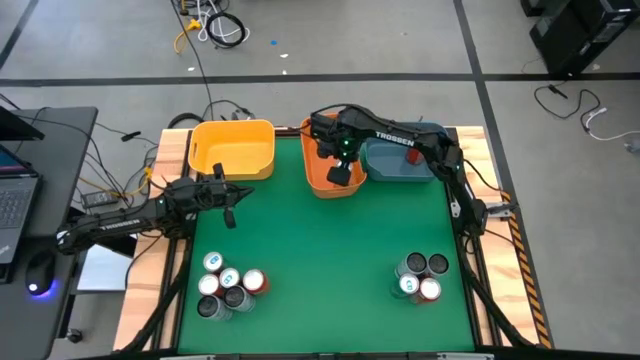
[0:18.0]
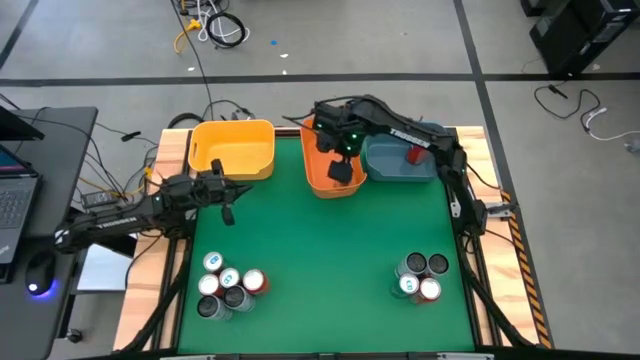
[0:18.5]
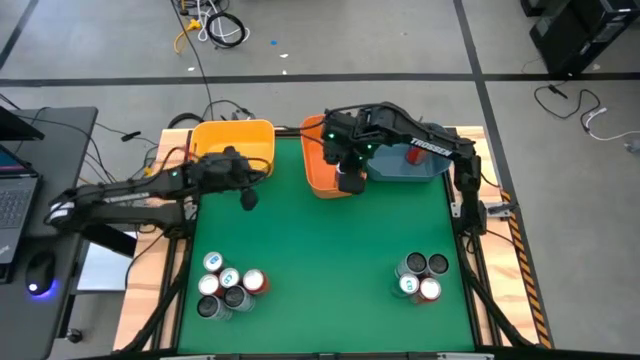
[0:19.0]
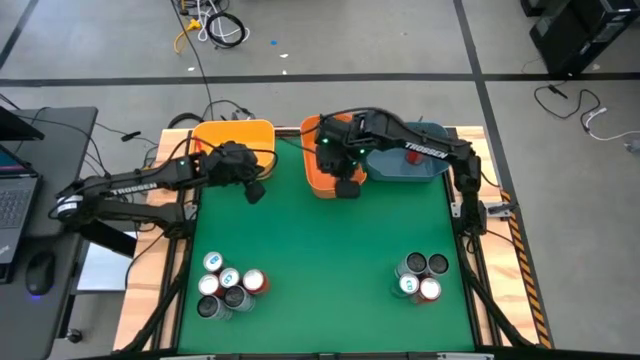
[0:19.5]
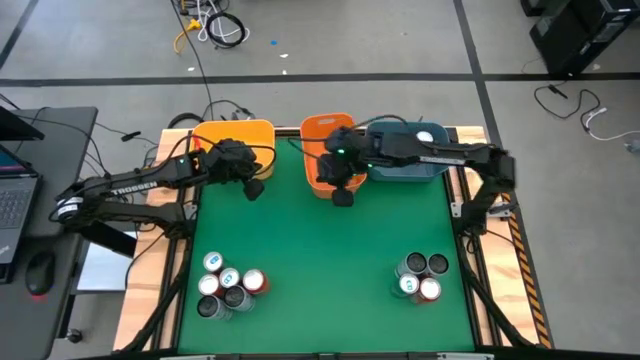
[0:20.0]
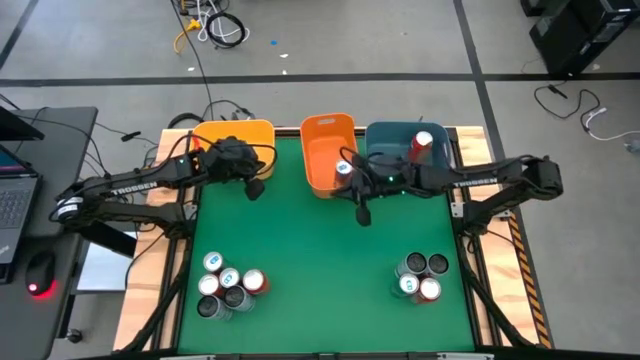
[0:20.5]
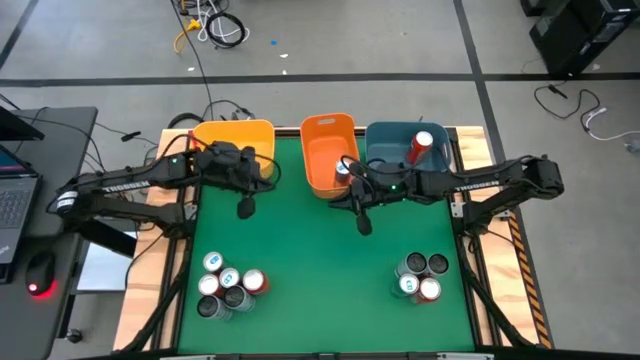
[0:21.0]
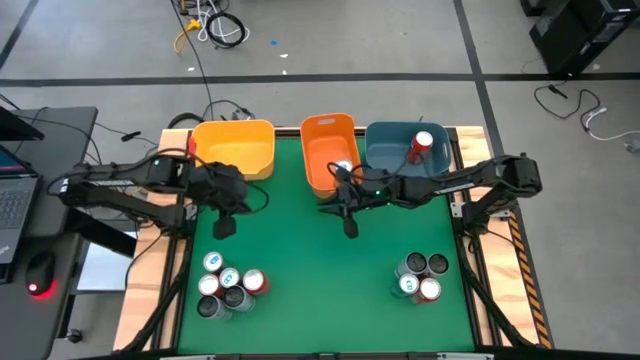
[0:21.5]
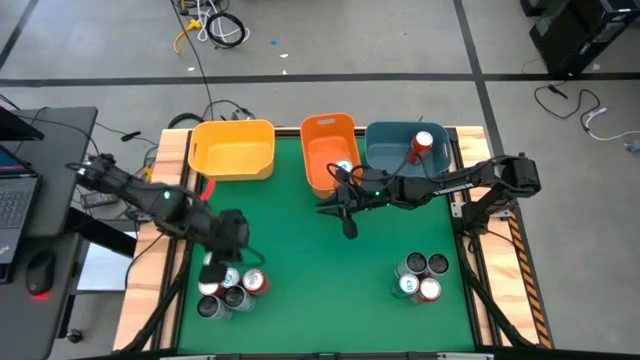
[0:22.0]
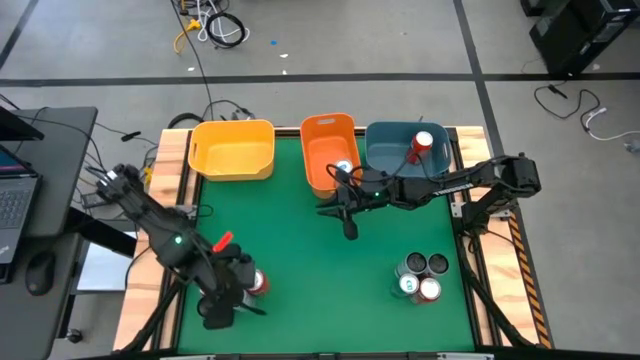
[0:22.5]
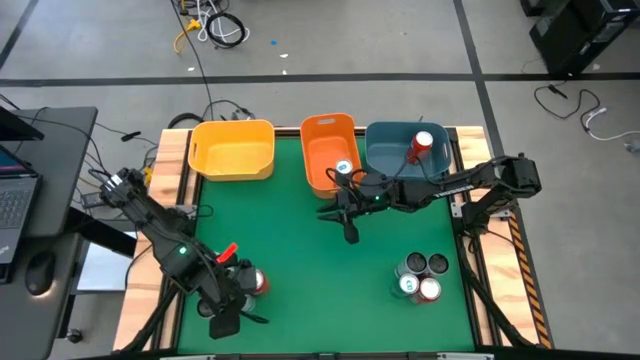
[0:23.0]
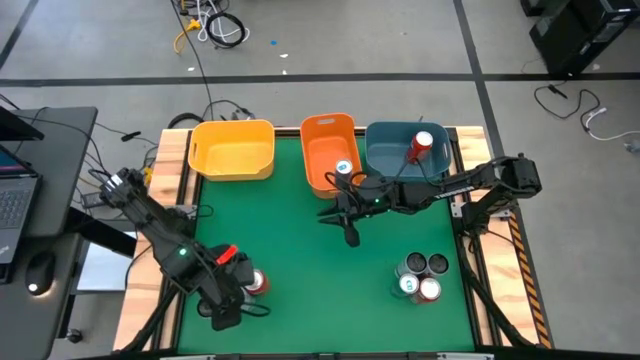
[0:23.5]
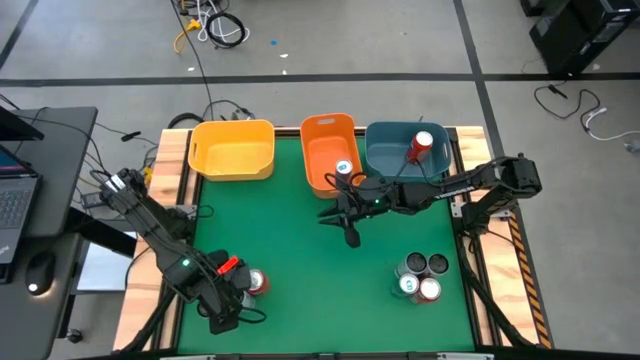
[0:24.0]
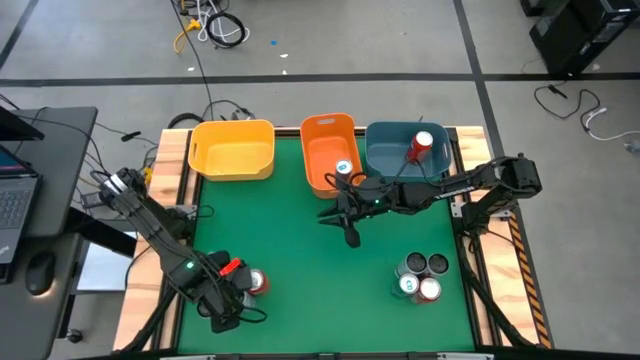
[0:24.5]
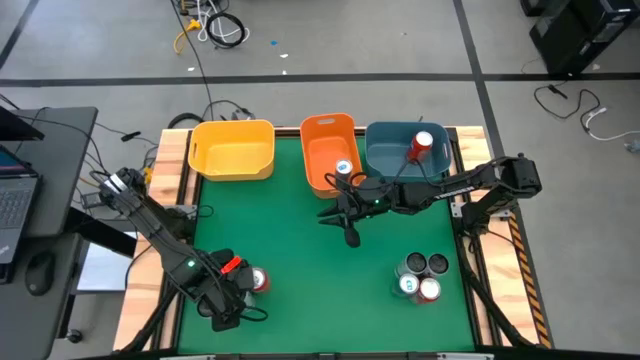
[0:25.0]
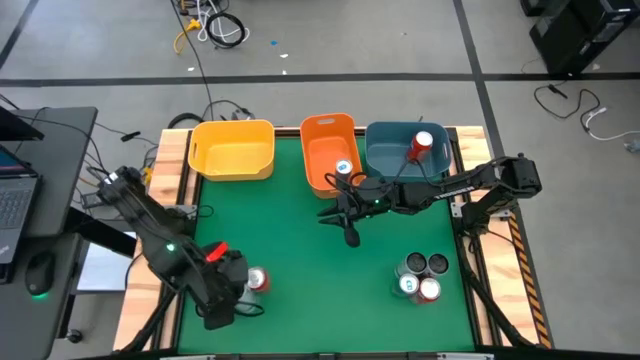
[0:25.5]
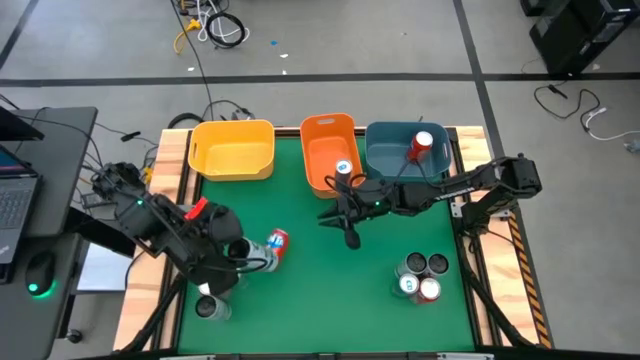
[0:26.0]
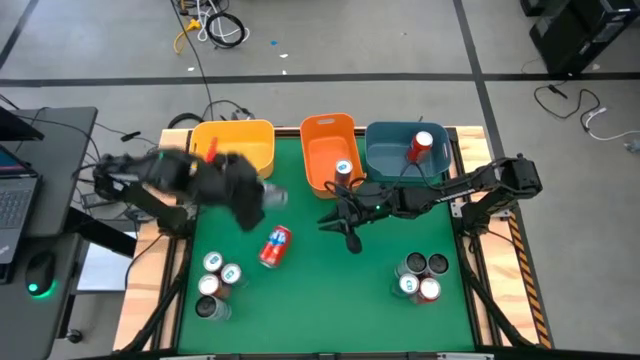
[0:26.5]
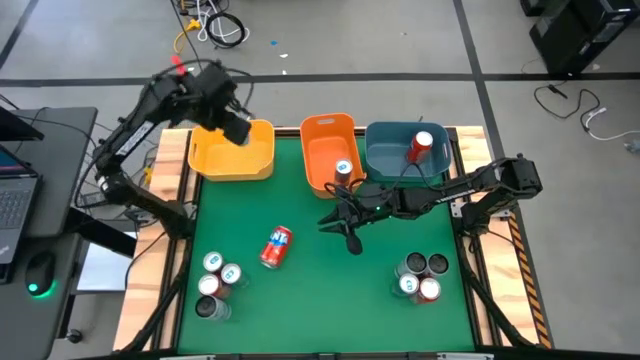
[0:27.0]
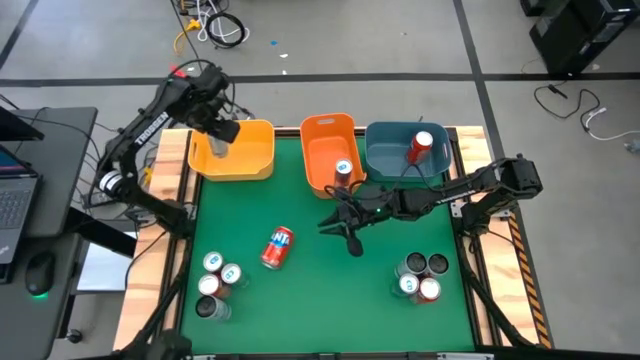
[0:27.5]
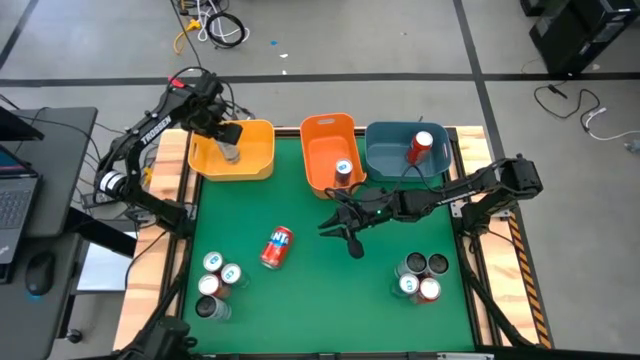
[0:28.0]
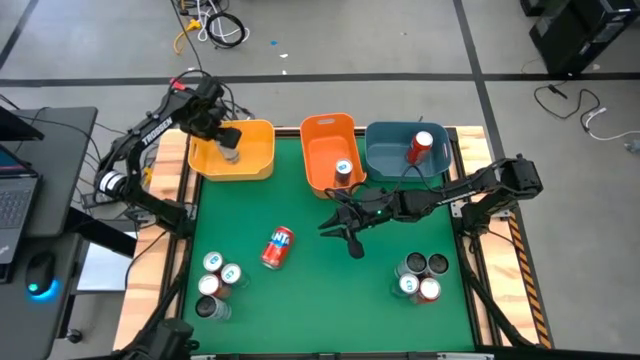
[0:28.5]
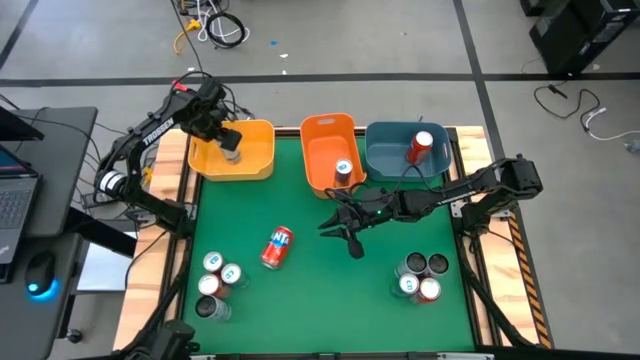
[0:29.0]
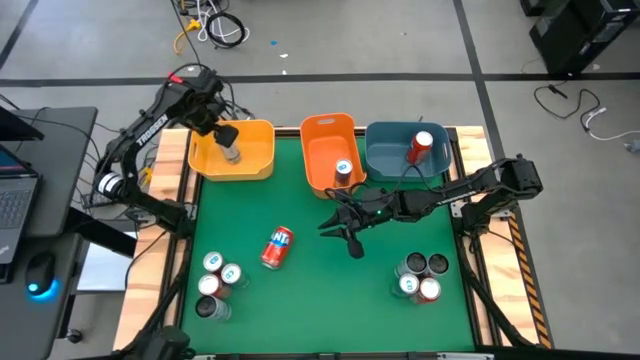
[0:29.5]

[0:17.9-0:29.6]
Task: Sort soda cans
Put the white blue soda can into the yellow bin

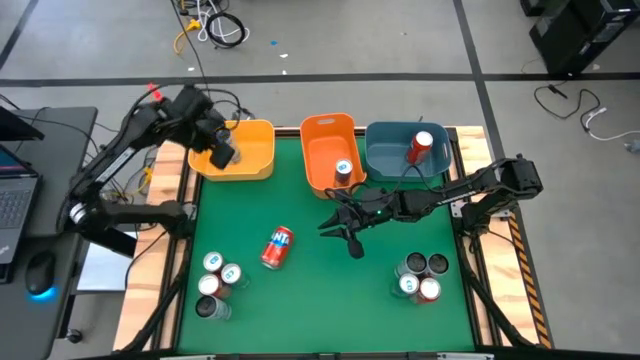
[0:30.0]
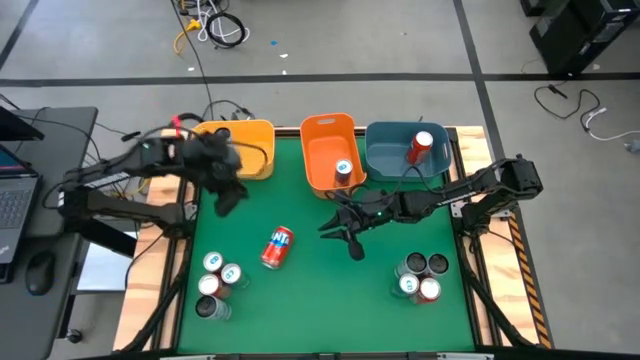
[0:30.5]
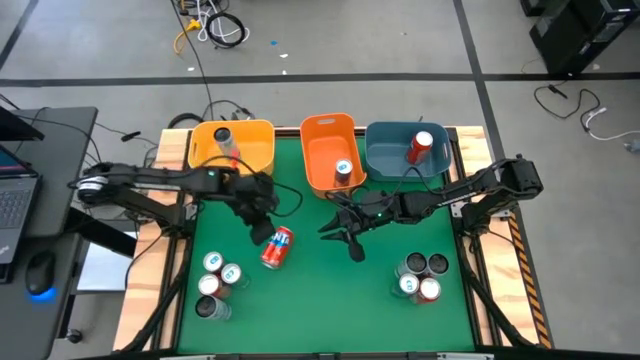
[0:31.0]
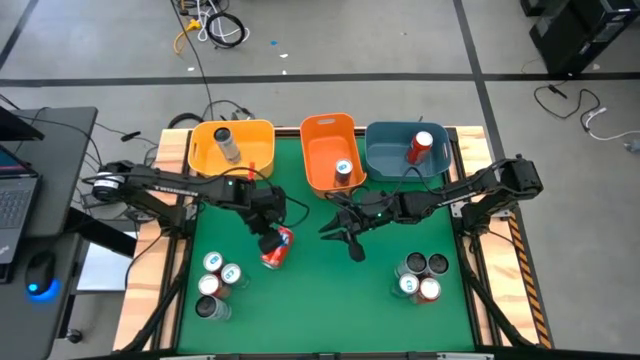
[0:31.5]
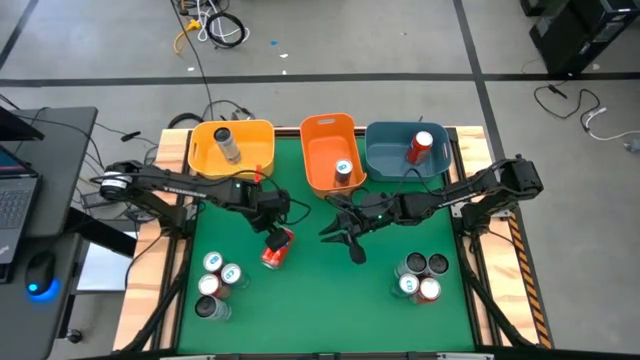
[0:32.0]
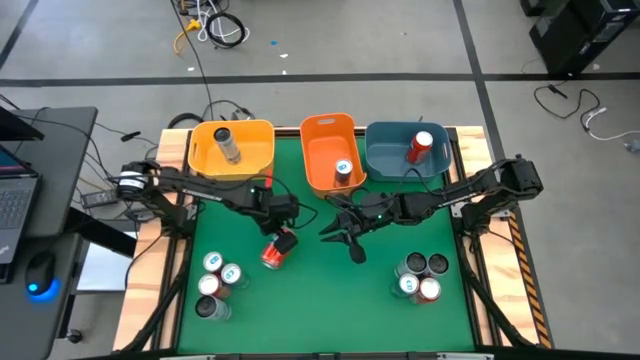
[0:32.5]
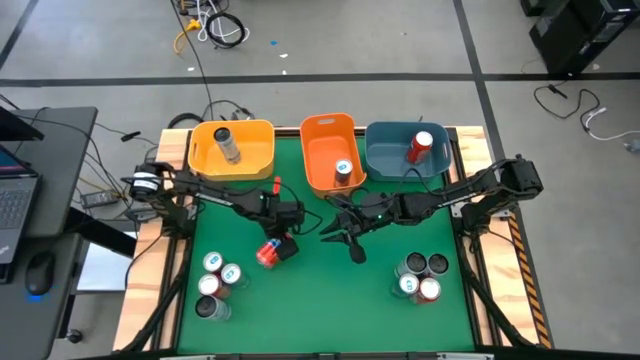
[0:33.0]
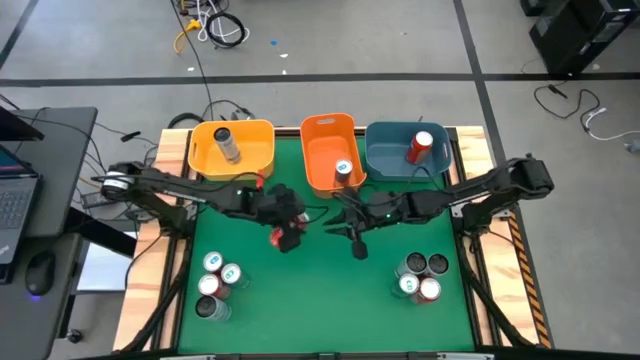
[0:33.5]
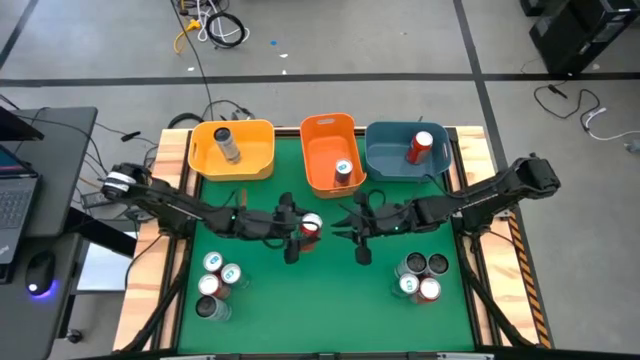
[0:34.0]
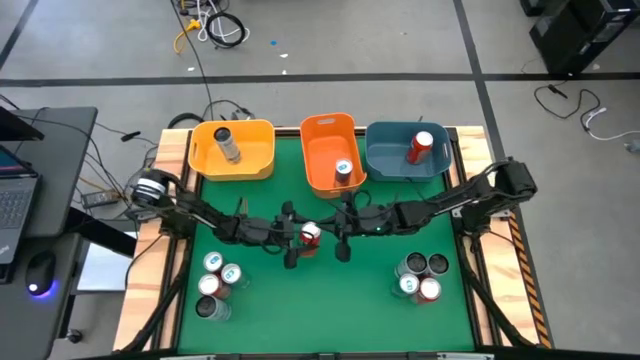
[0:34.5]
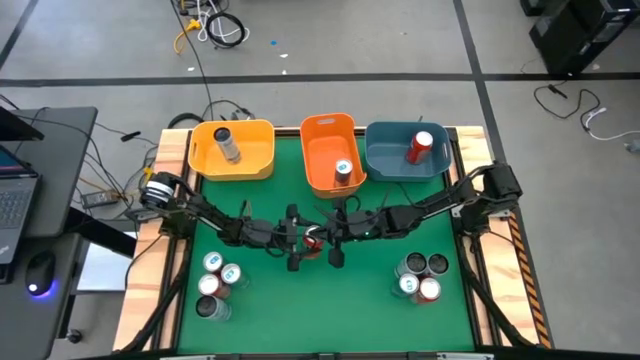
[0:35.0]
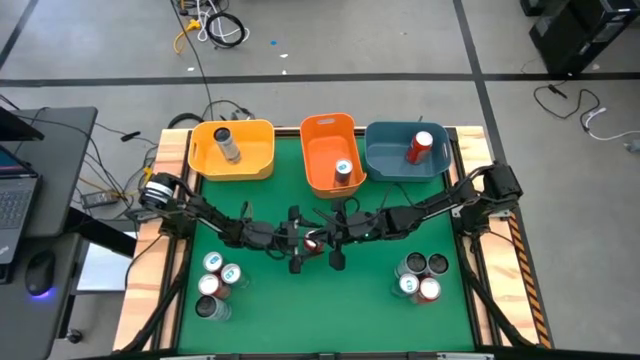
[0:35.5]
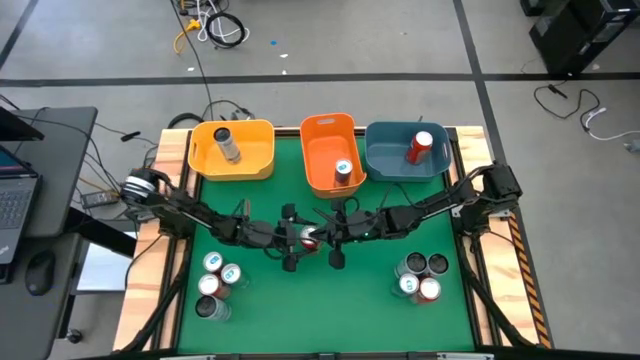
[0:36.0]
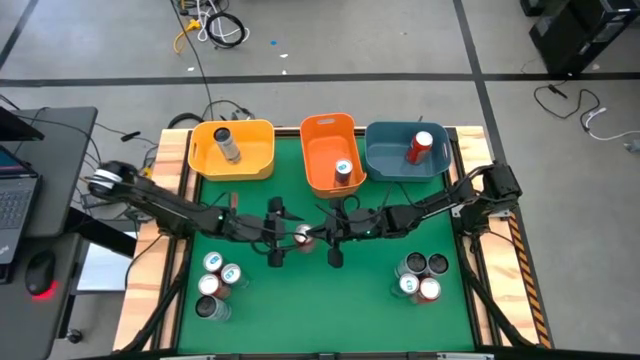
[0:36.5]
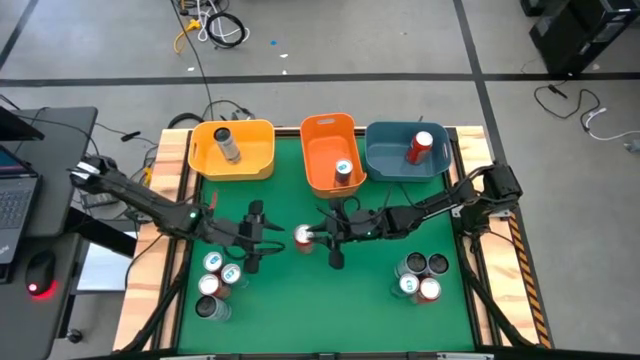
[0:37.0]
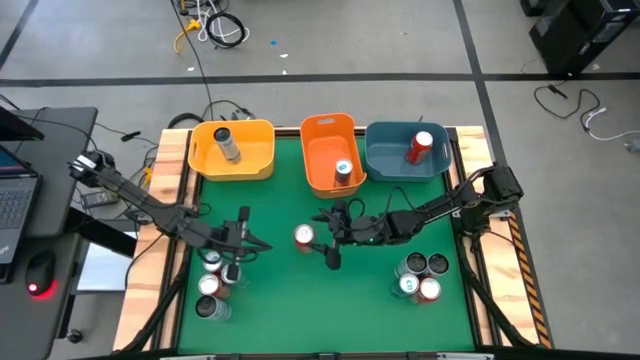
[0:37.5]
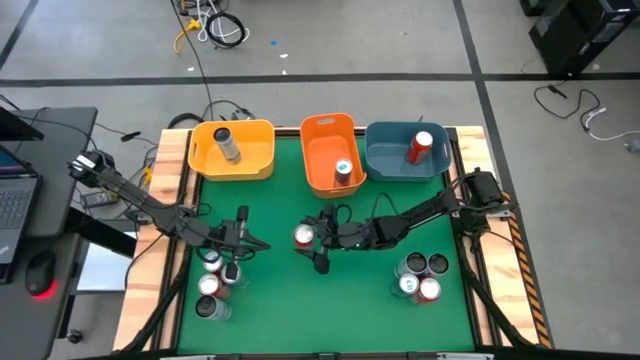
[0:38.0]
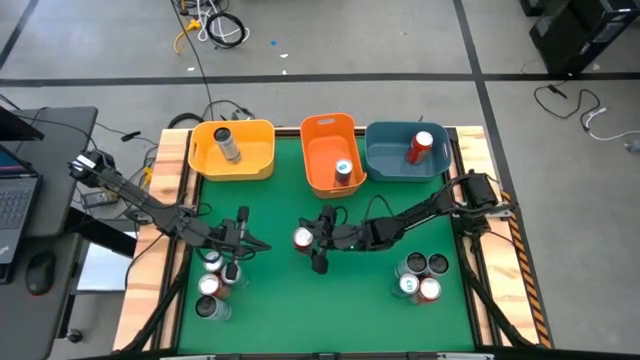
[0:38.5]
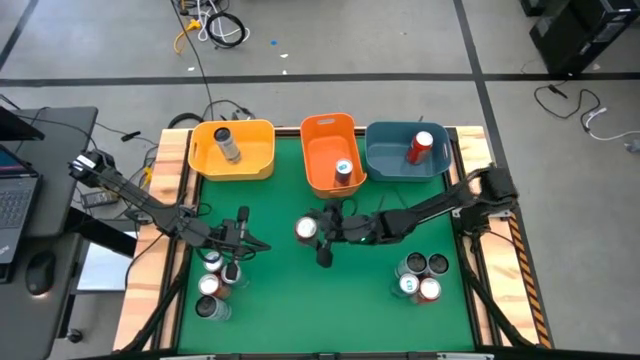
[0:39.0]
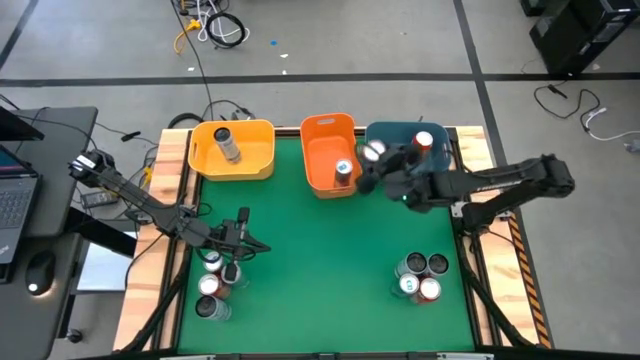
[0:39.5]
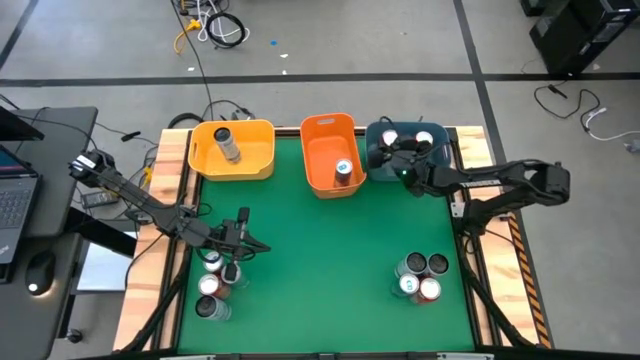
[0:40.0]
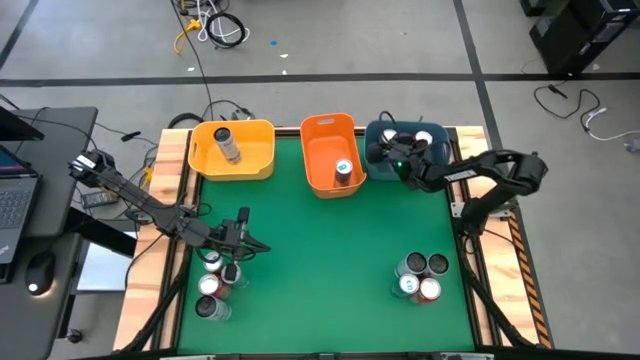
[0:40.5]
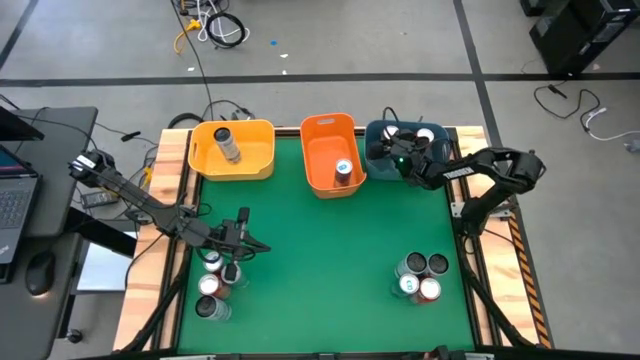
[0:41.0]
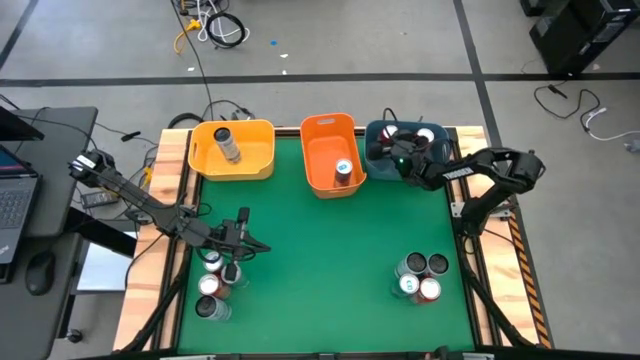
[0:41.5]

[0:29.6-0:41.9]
Put the orange soda can into the blue bin
